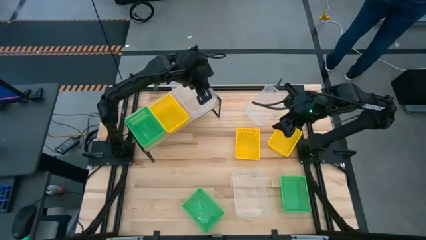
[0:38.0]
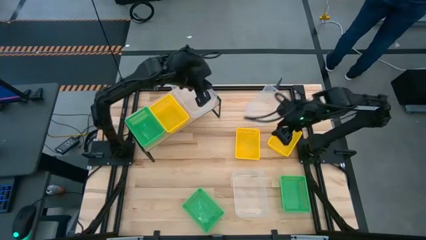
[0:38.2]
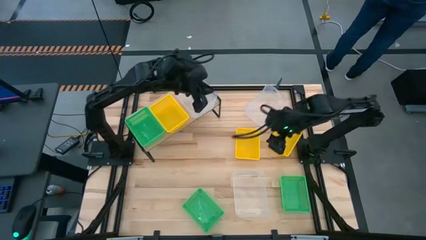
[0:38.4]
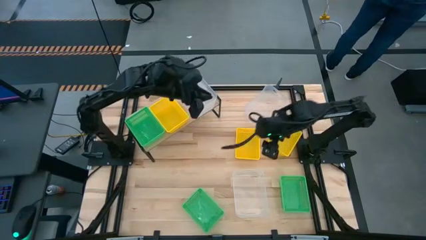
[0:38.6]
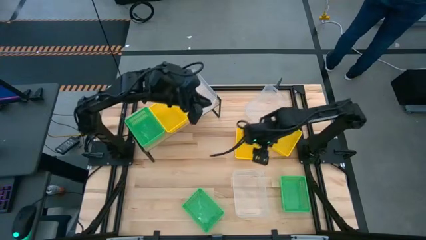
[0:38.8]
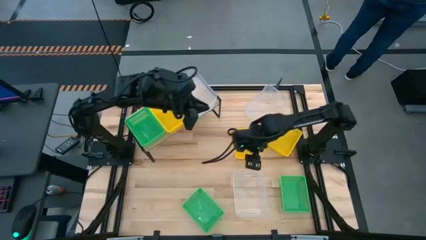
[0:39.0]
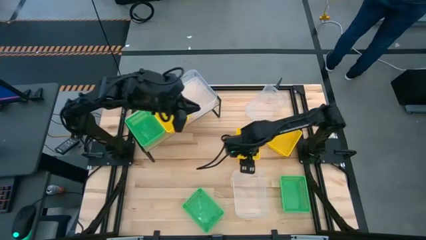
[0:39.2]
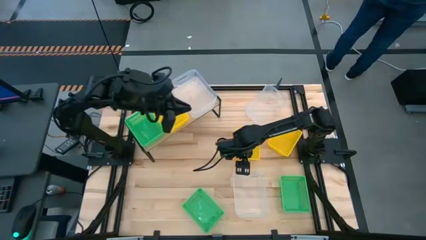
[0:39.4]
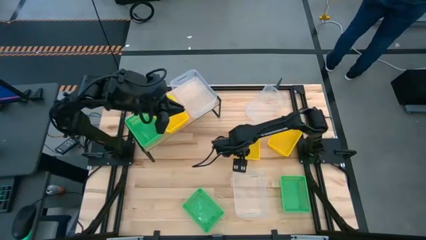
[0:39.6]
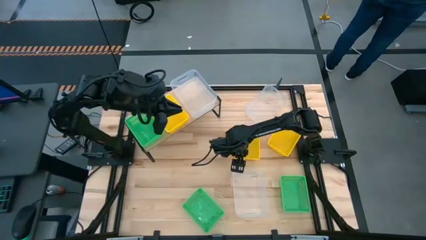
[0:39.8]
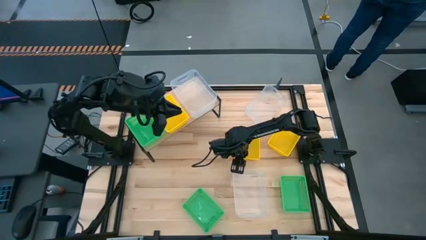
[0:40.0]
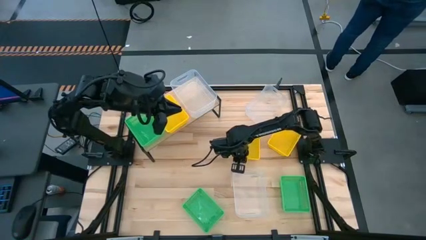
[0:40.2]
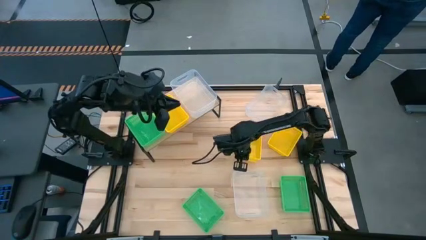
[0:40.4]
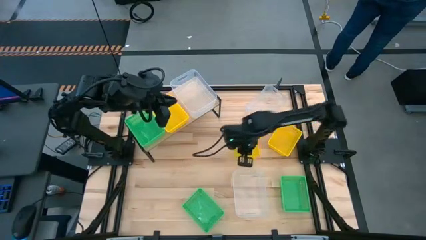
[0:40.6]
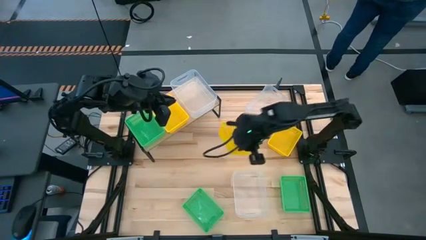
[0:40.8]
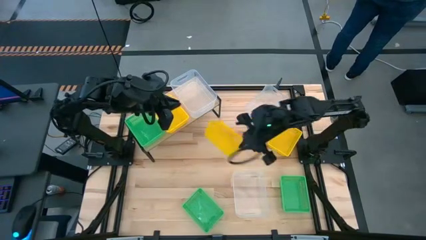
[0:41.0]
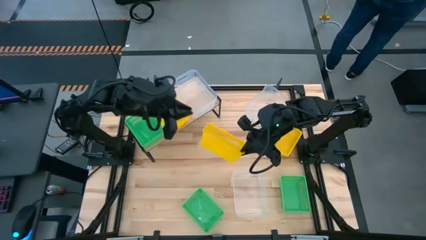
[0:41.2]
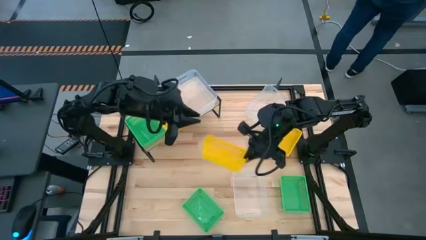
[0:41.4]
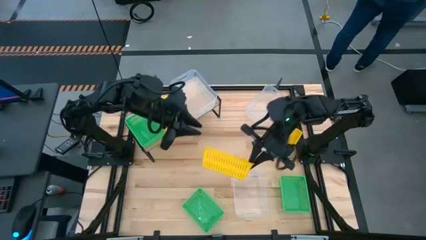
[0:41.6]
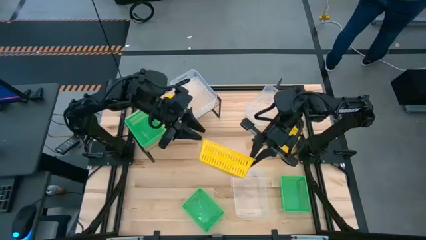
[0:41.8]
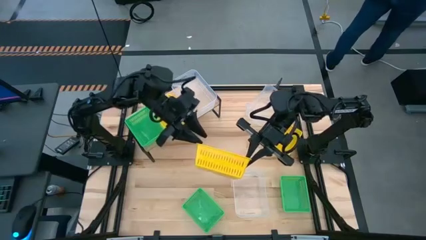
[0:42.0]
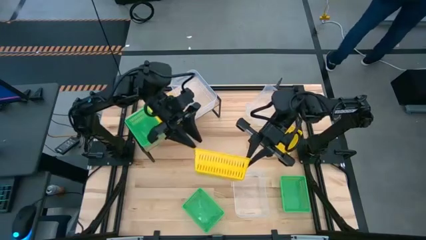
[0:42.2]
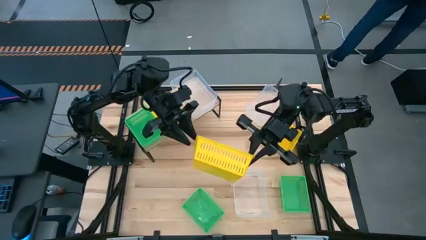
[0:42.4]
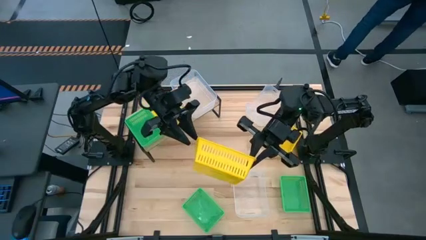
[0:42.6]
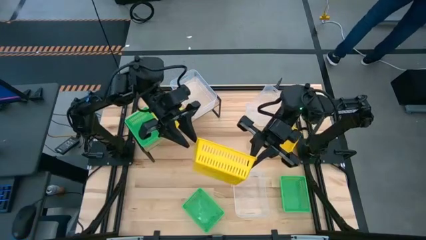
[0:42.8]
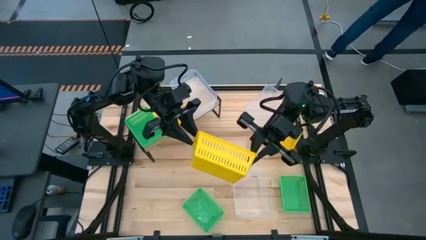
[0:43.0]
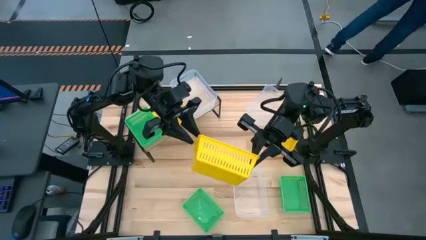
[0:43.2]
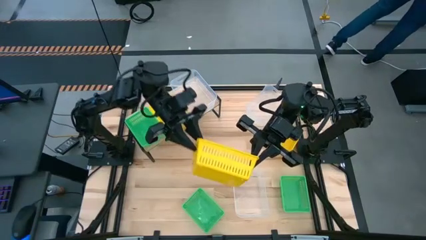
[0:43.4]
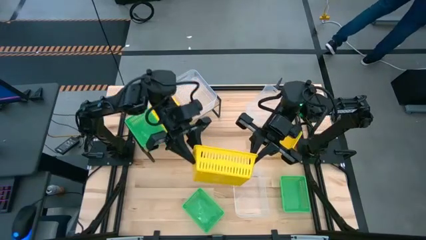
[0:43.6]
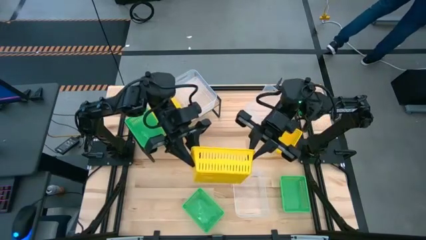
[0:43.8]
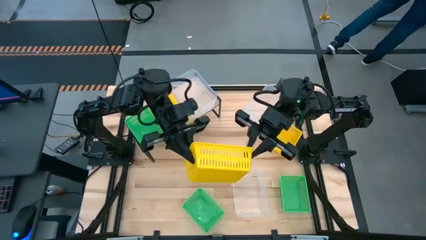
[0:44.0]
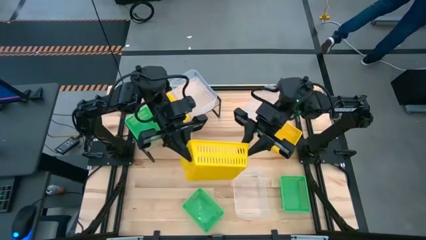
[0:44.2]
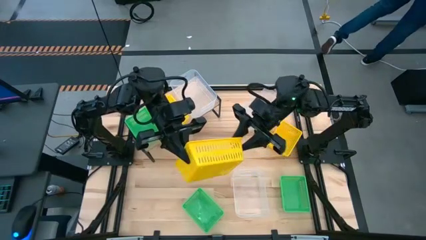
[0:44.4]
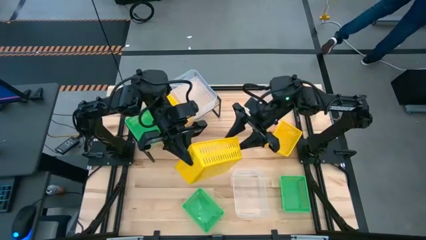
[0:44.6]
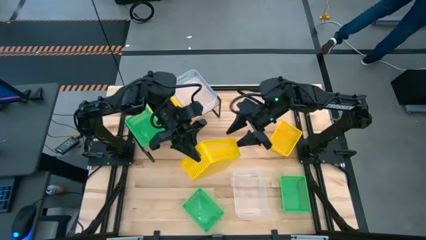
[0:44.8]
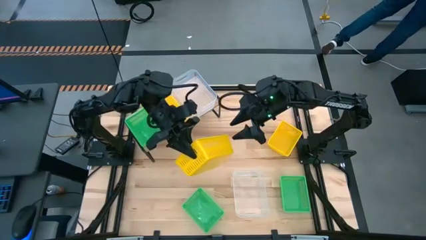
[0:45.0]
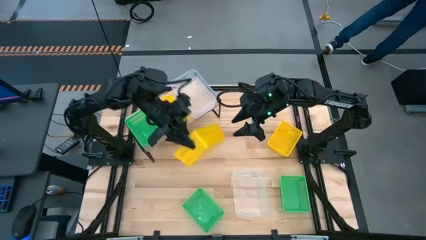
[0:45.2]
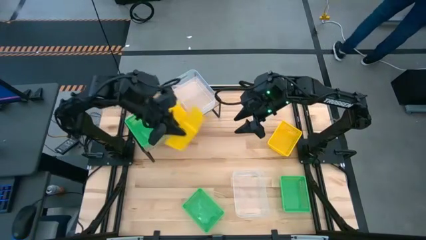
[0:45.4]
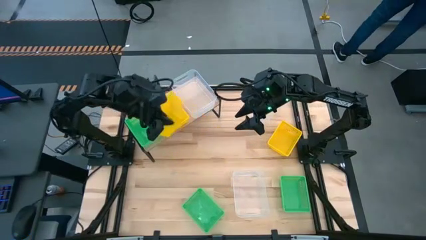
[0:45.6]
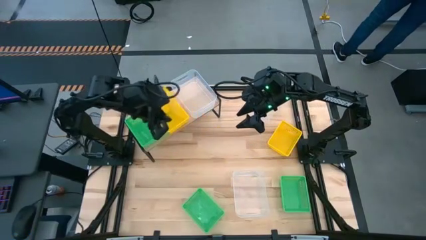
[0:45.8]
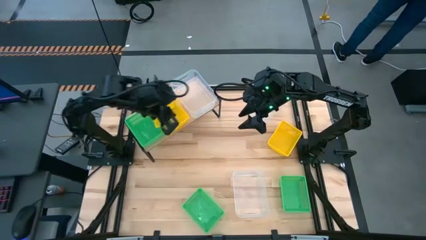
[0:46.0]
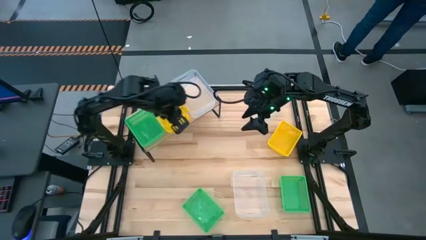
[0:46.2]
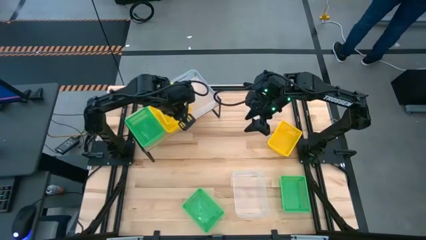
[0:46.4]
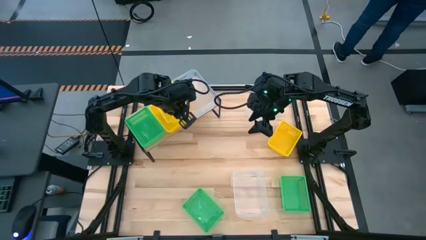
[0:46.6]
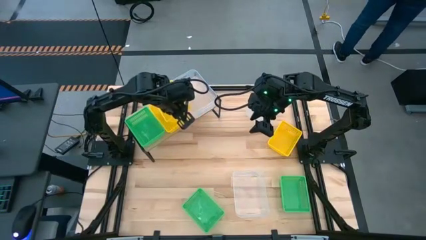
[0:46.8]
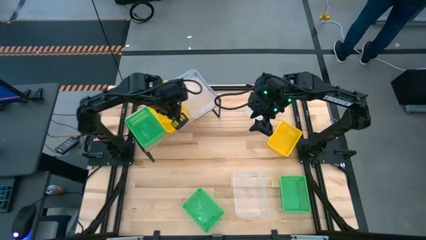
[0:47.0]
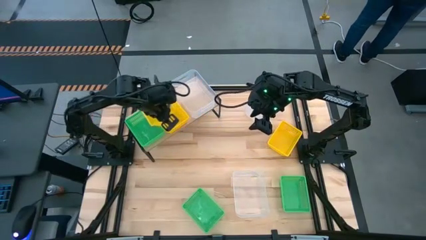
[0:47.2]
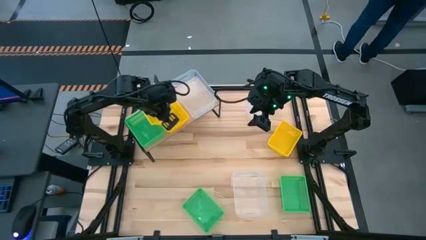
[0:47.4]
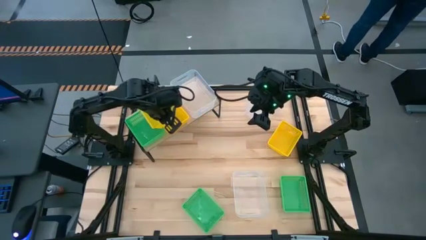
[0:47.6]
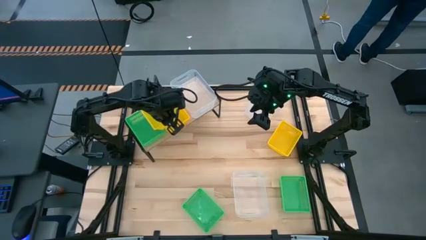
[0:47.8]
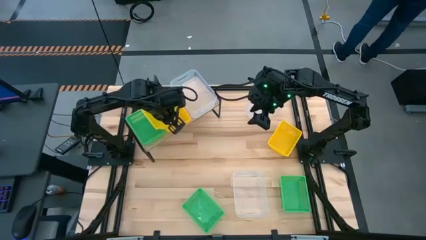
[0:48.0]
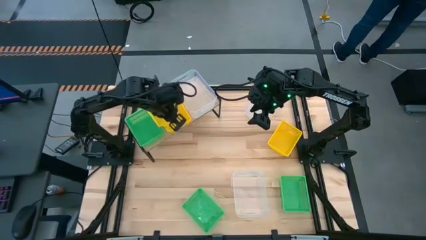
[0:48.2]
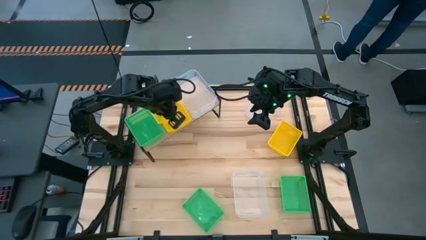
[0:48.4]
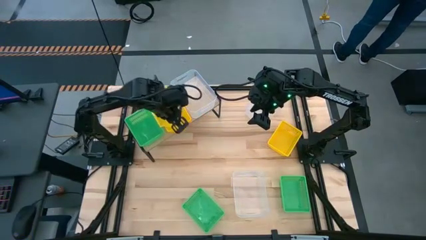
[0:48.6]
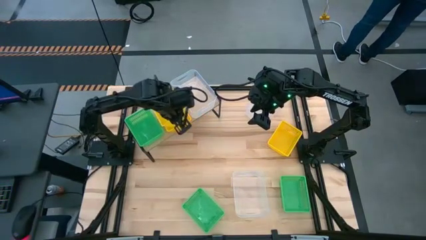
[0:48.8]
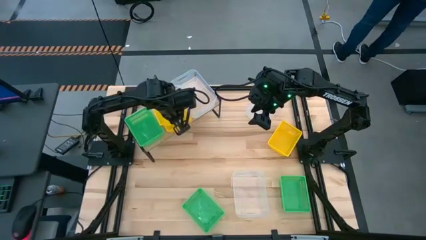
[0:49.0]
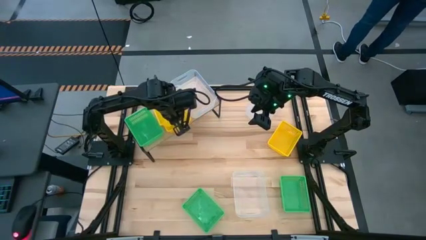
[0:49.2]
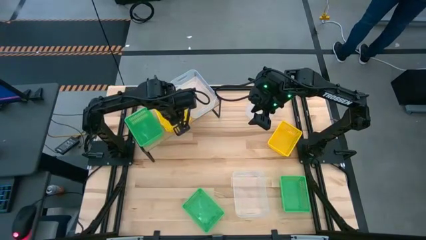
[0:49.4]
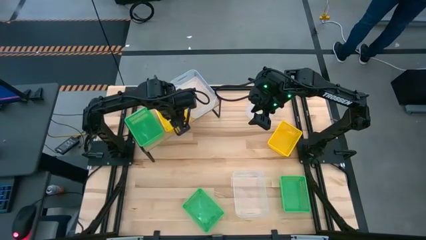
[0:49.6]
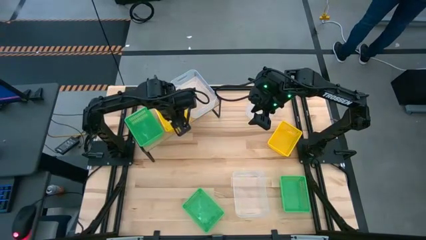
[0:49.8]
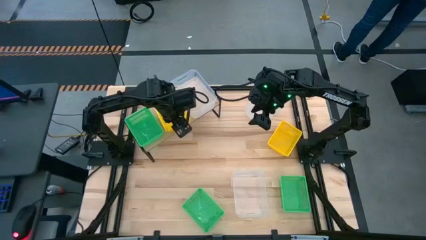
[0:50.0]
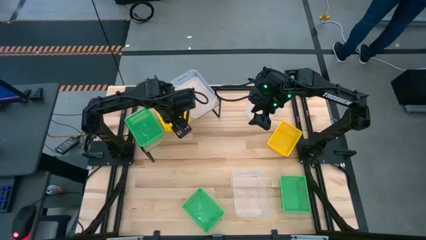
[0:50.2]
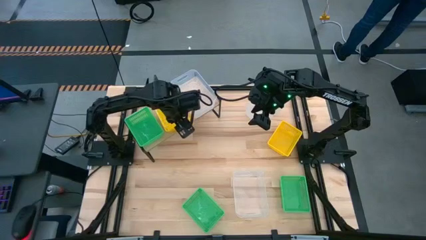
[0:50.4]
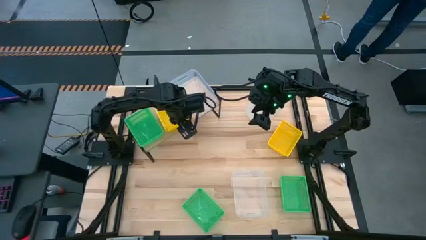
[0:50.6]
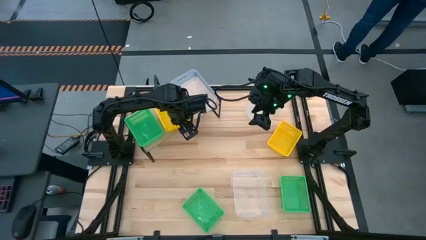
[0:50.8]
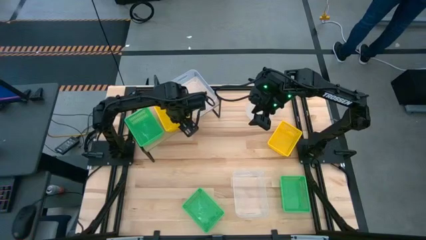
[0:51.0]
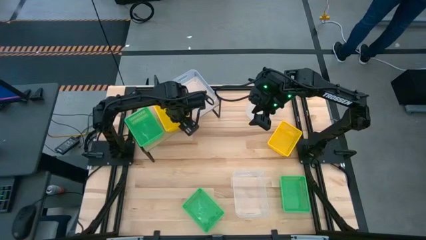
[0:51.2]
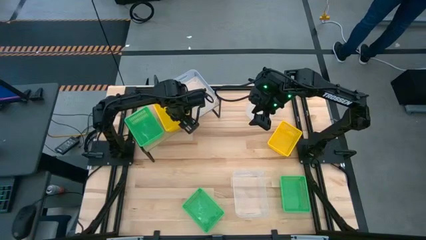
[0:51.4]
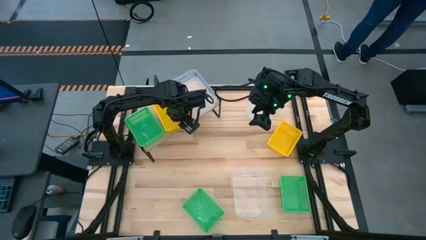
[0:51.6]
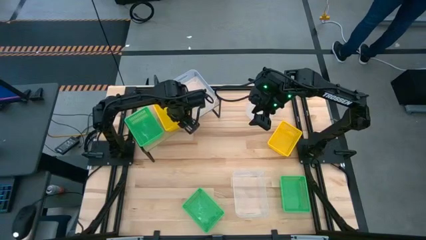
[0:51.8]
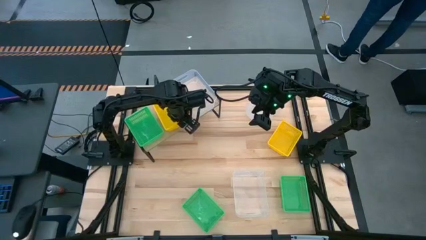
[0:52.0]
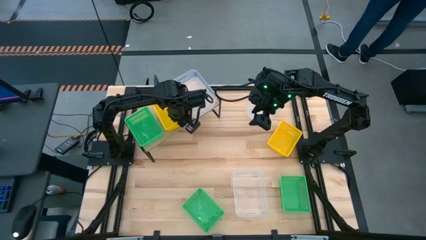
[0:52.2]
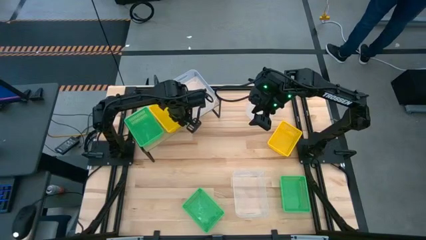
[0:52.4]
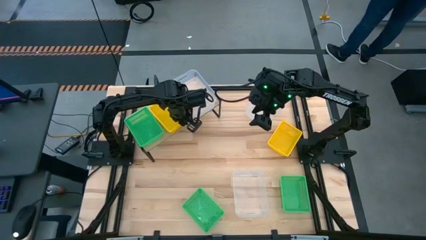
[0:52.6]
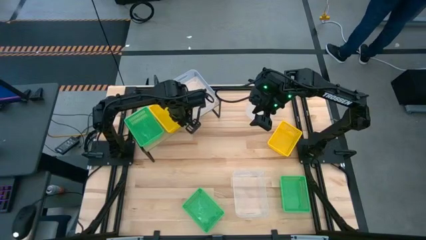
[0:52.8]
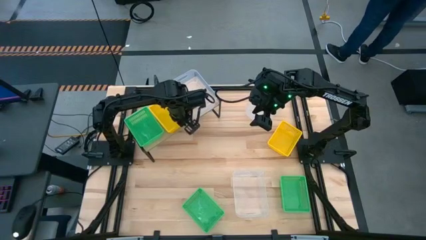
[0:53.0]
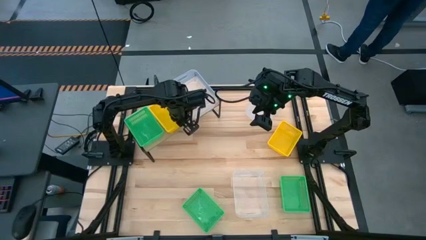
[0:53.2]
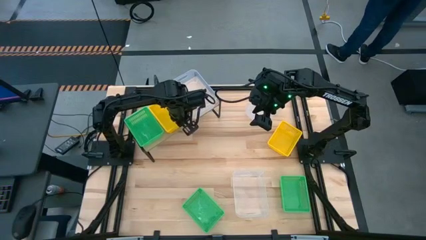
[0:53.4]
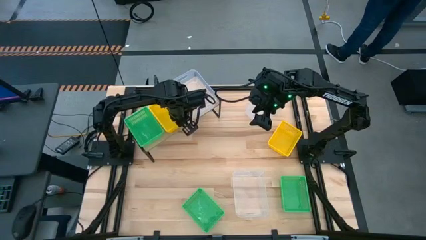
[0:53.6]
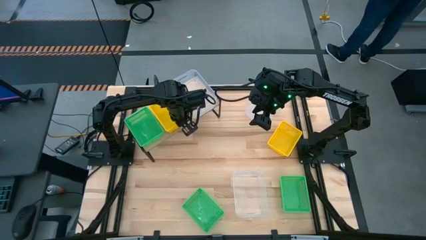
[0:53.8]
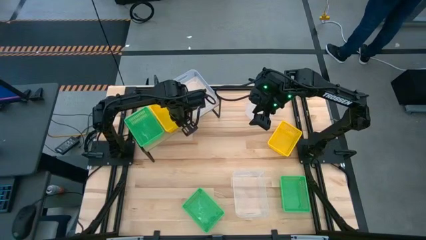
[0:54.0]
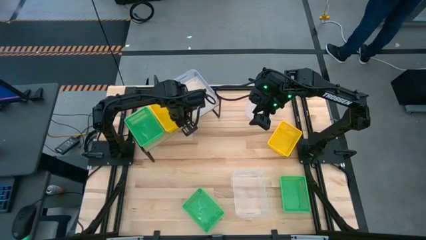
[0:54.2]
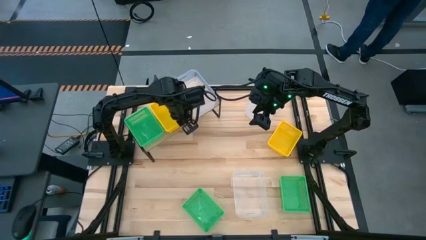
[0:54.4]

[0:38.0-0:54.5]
Task: Stack baskets on shelf by color
Stack the left yellow bin on top of the yellow bin on the shelf
